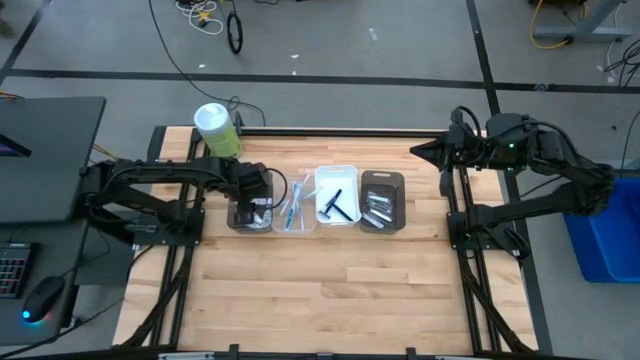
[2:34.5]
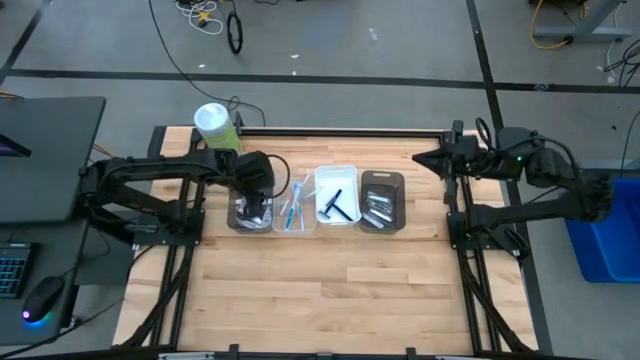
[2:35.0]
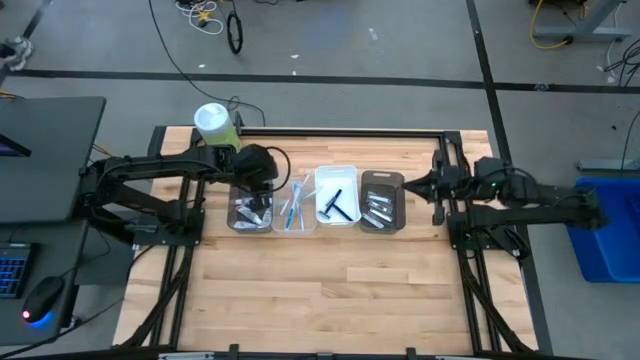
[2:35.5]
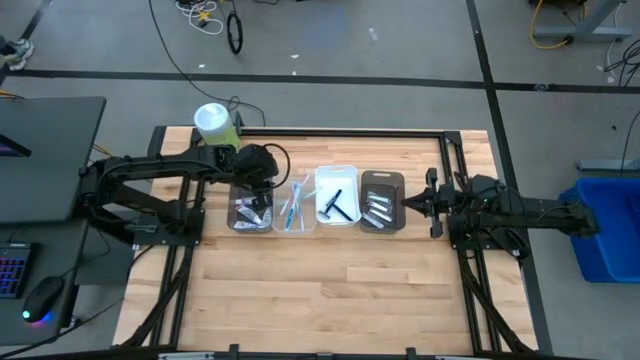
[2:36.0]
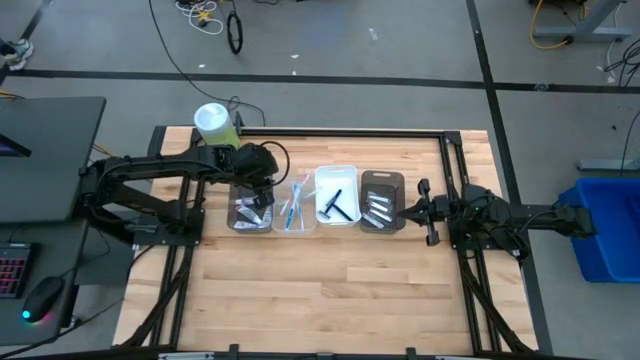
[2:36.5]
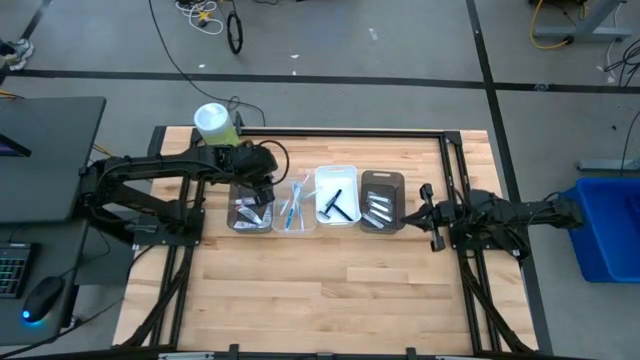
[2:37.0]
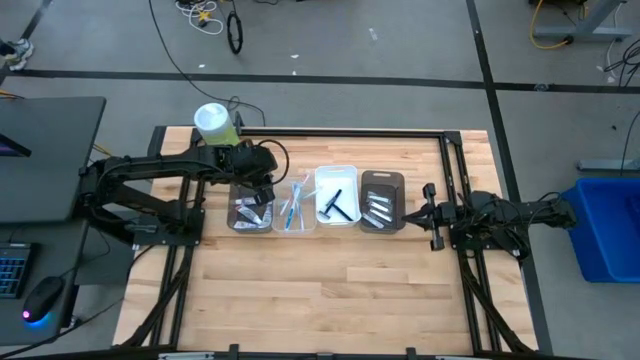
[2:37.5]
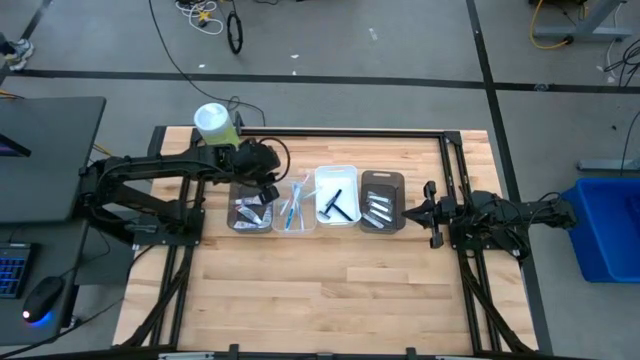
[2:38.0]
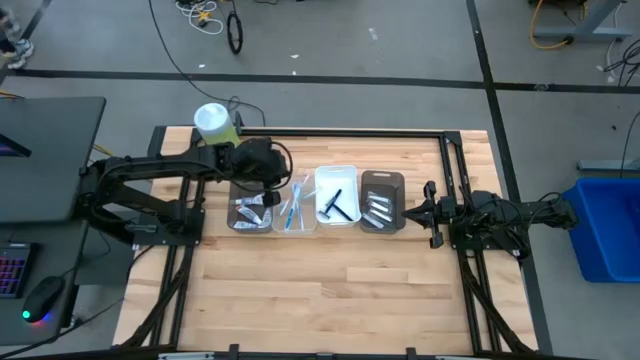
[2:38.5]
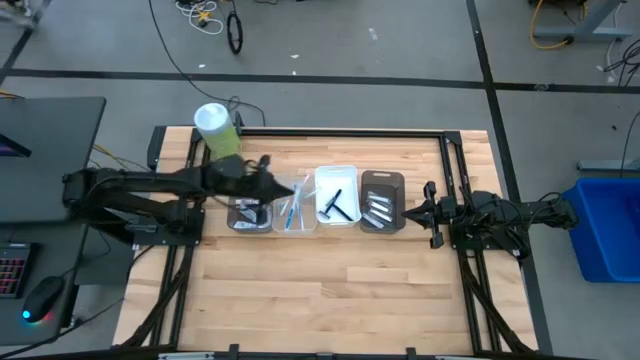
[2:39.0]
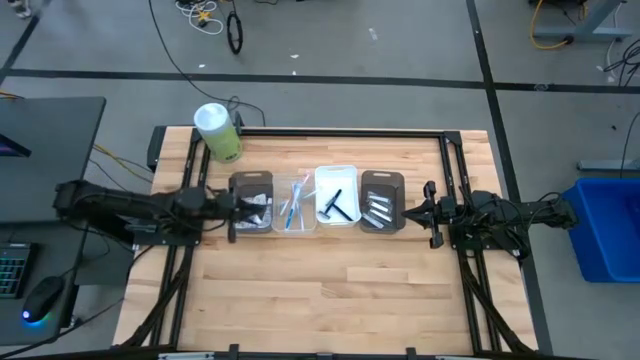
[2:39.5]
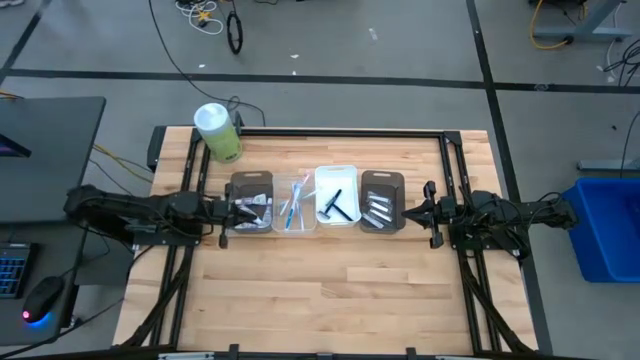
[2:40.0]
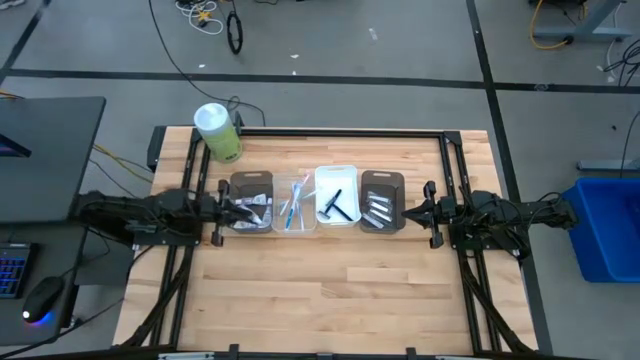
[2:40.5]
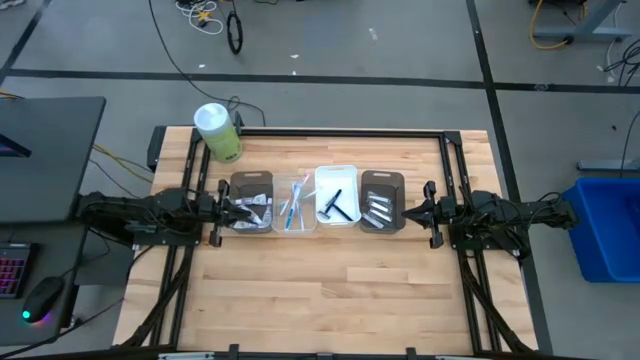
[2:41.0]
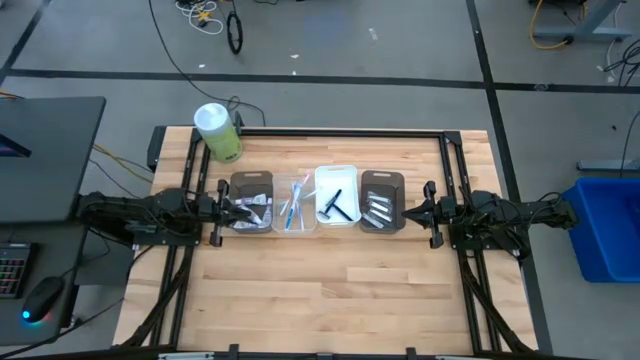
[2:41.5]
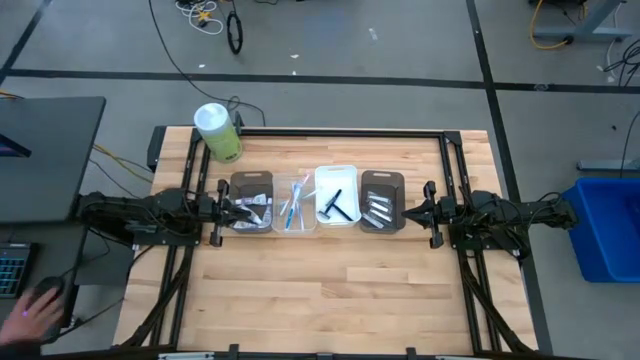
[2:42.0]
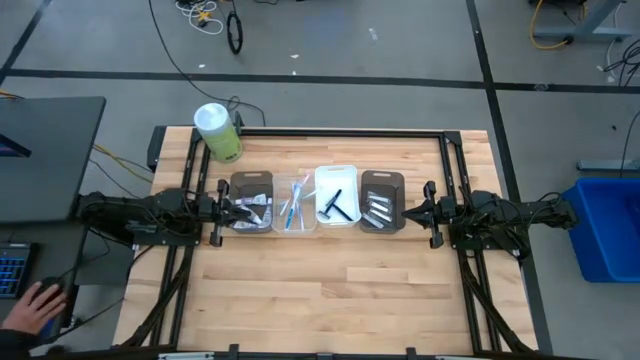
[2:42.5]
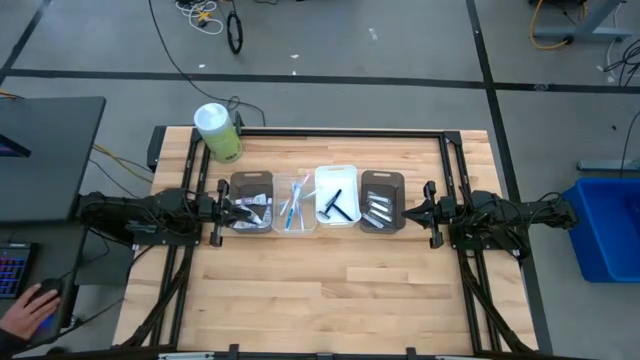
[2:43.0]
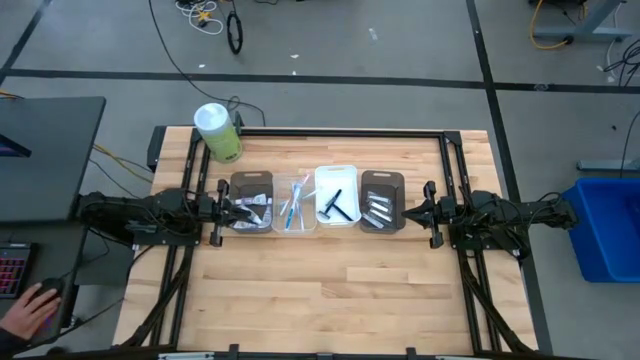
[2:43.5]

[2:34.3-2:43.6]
Task: Pick & Place Travel size toiletries
Return to Home Position

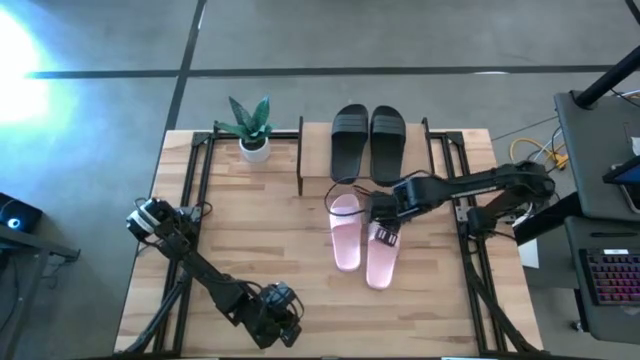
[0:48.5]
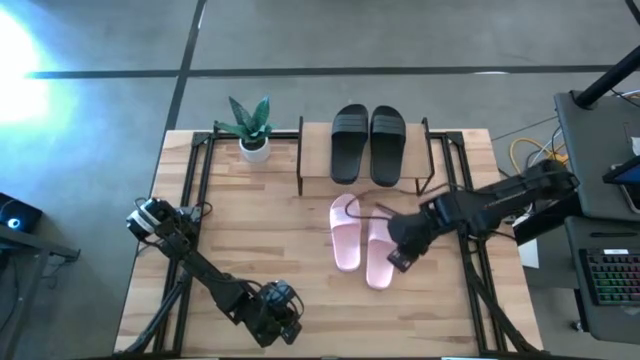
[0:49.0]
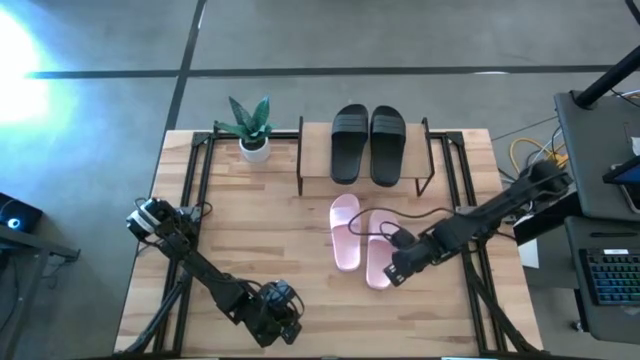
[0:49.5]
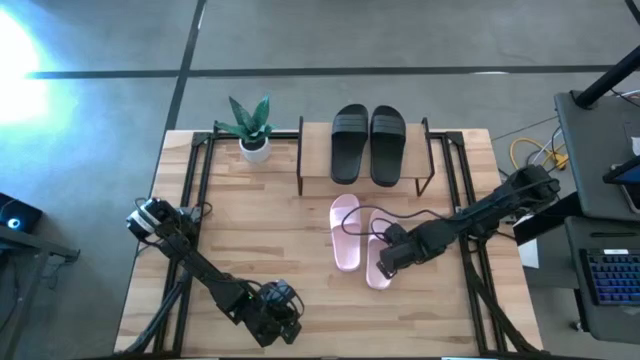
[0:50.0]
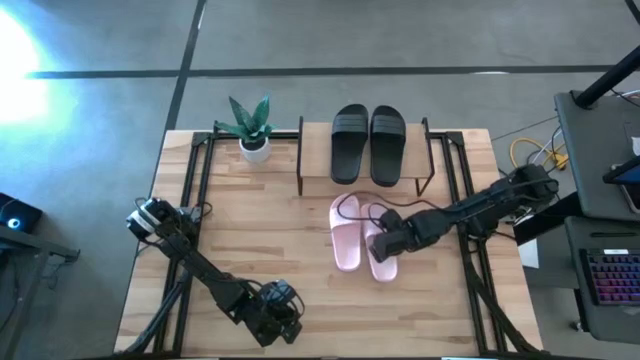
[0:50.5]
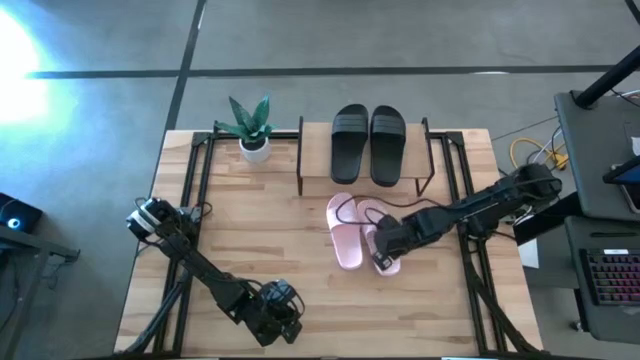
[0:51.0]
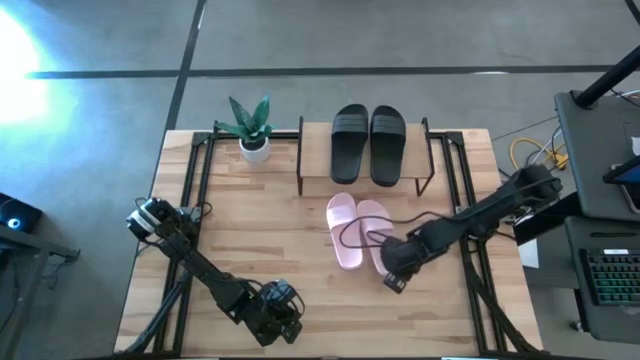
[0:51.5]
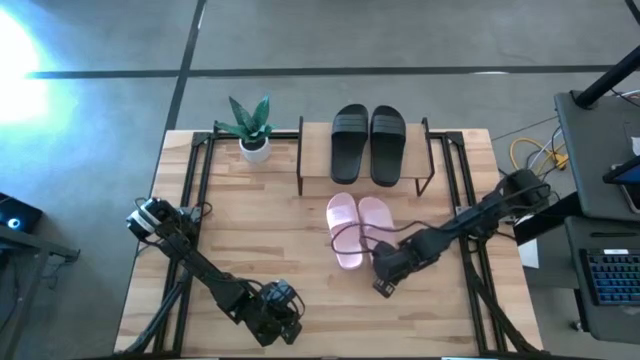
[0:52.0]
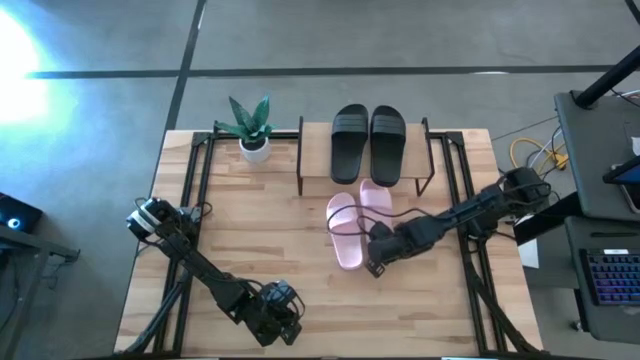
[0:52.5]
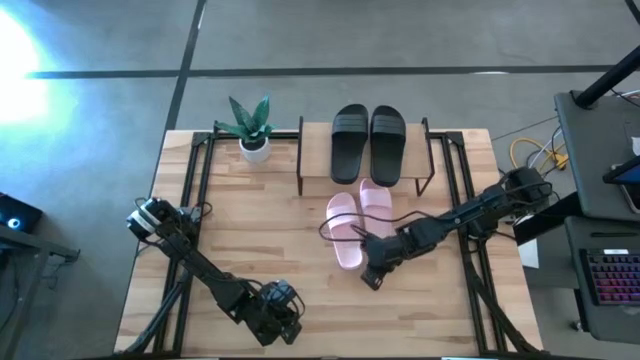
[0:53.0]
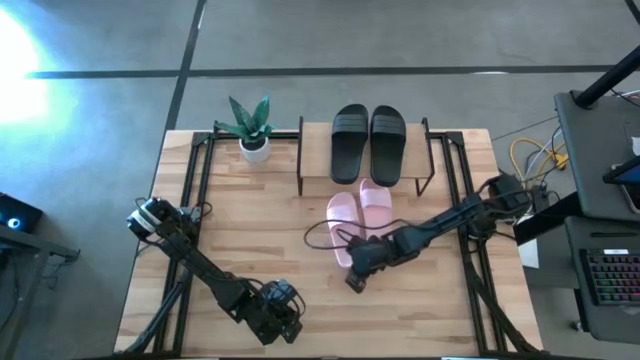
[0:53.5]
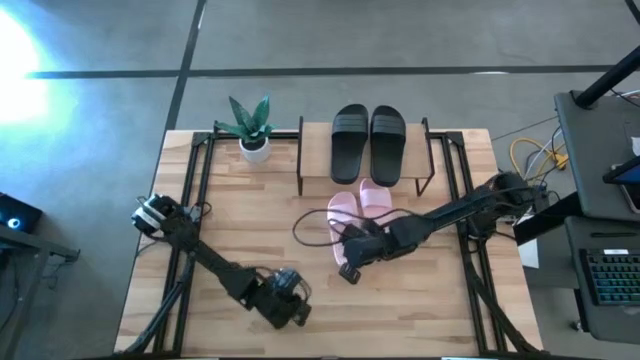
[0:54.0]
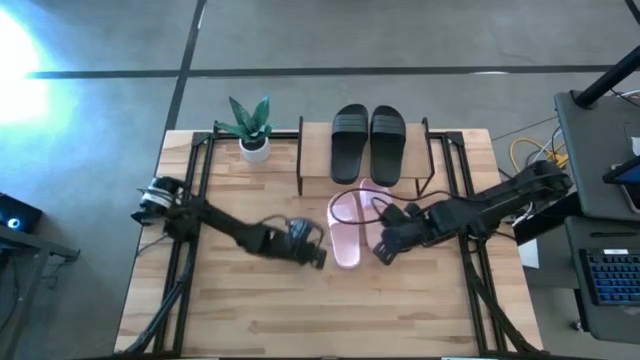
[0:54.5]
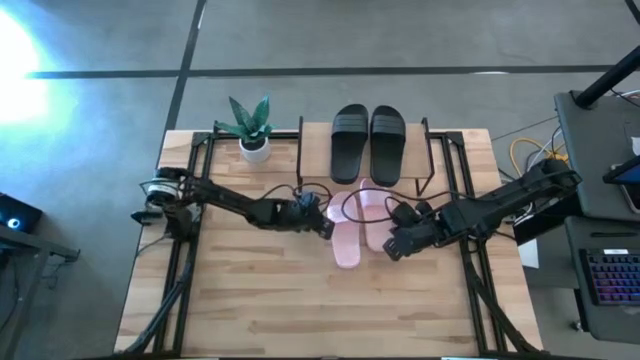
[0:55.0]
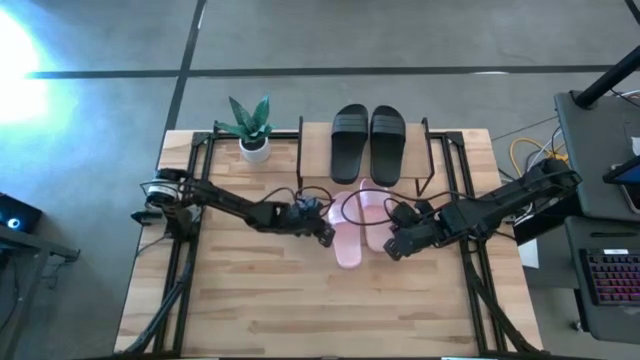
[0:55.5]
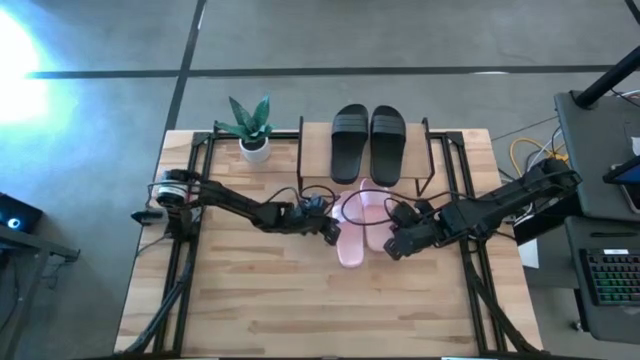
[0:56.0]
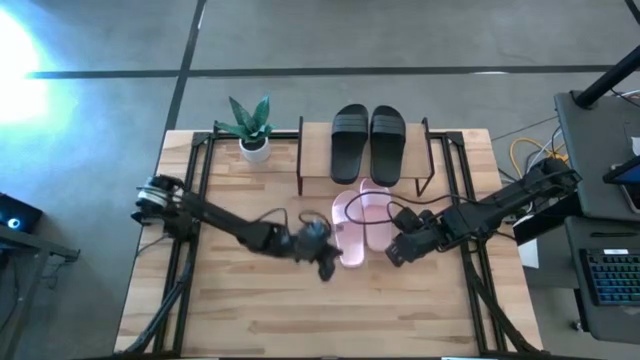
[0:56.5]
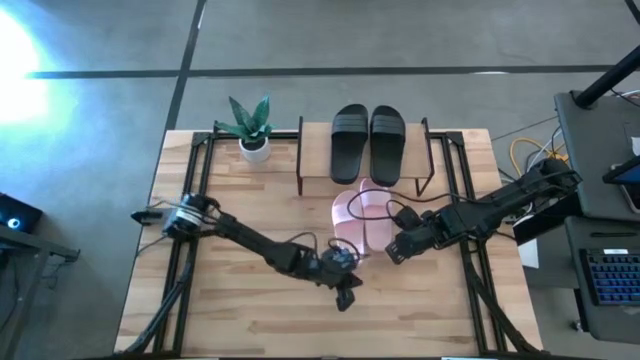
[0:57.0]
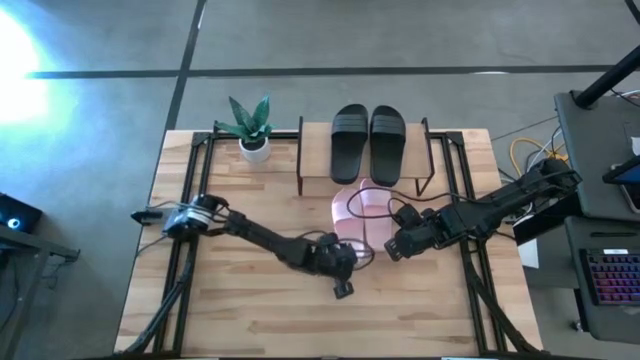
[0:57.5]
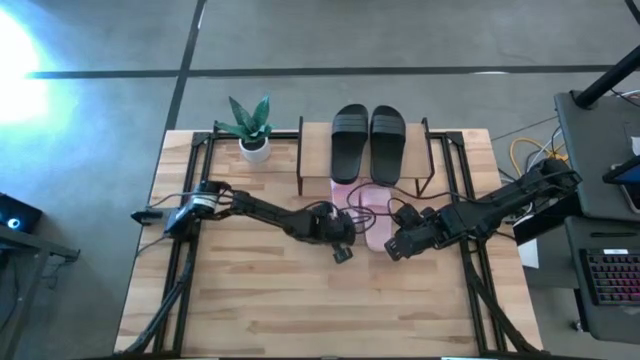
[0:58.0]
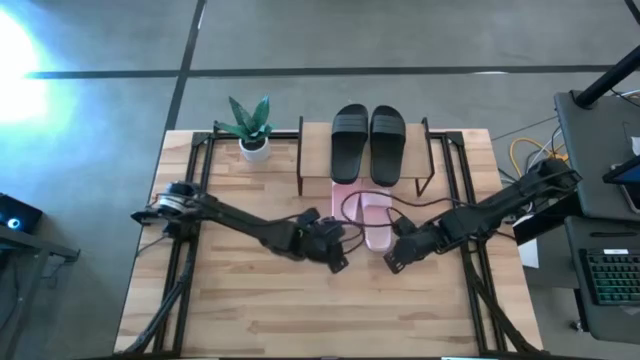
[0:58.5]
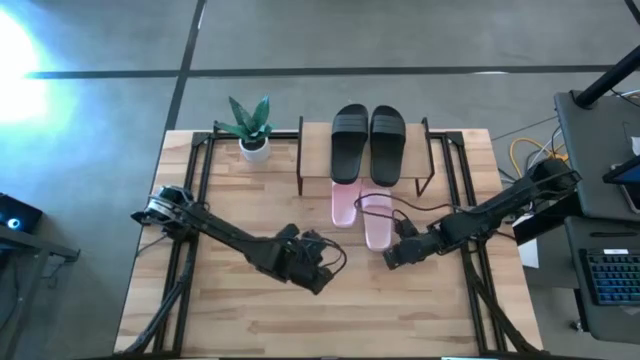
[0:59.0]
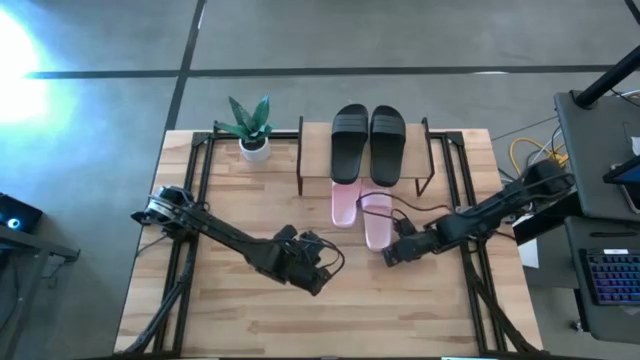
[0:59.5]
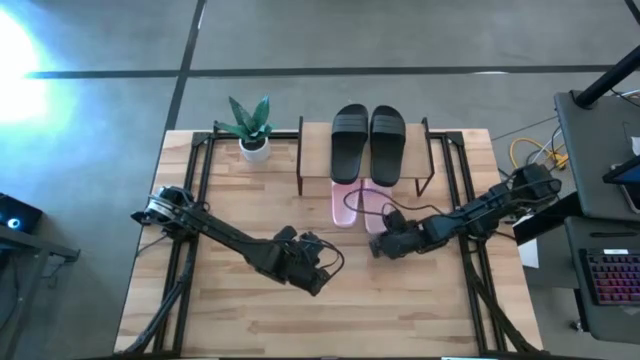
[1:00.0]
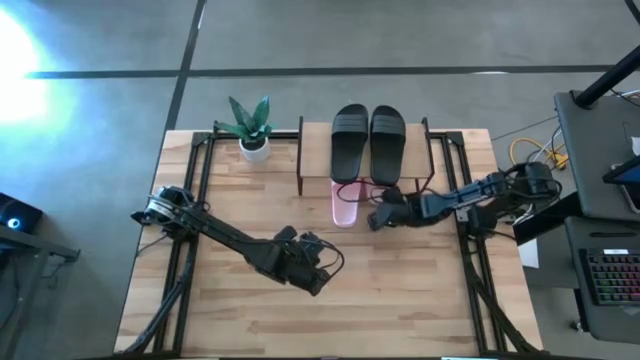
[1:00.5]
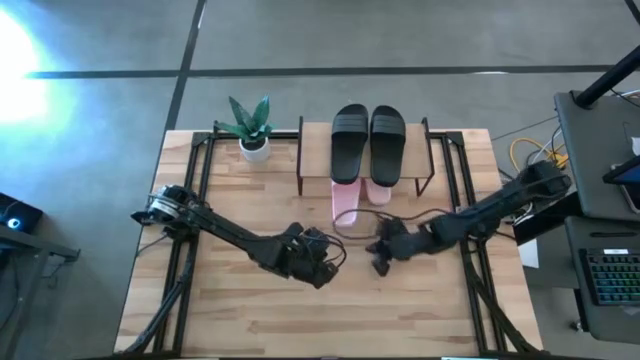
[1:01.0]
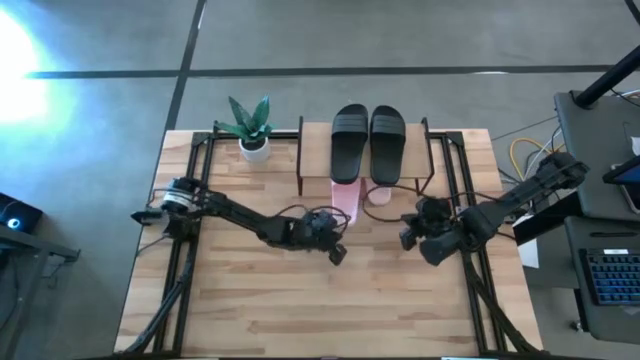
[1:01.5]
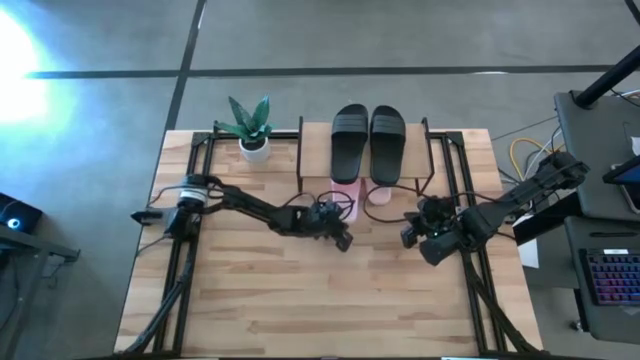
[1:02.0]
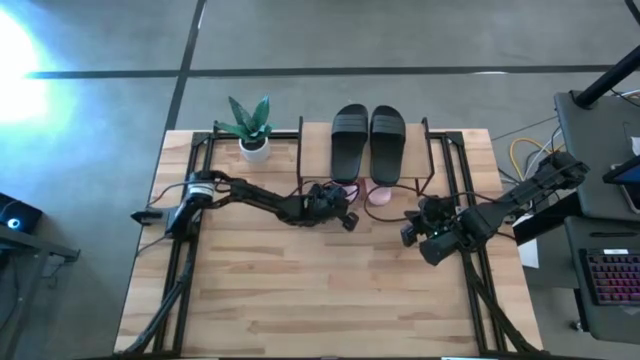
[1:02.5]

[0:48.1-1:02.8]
Task: Pick and place slides into the shelf
Adjust the pair of pink slippers under the shelf
